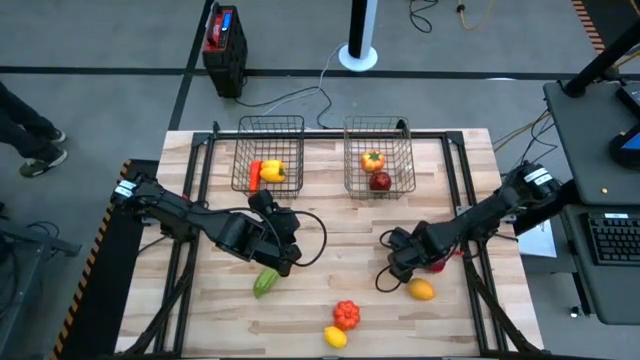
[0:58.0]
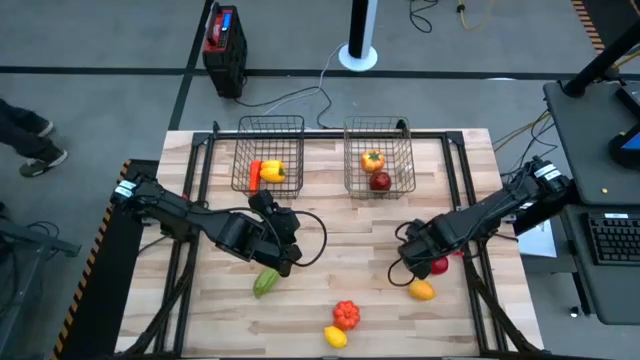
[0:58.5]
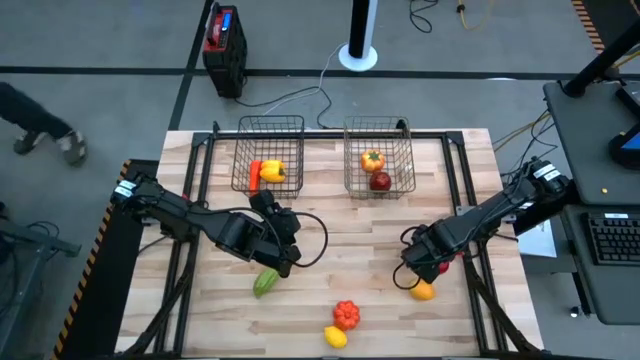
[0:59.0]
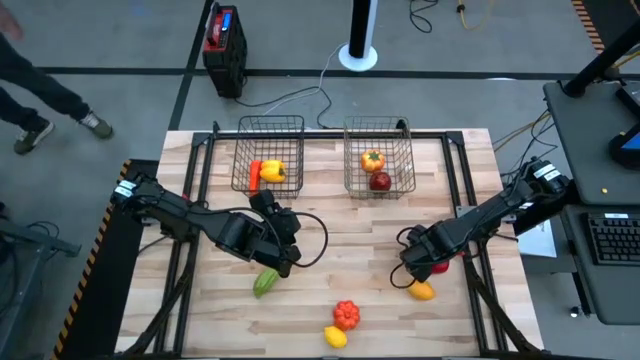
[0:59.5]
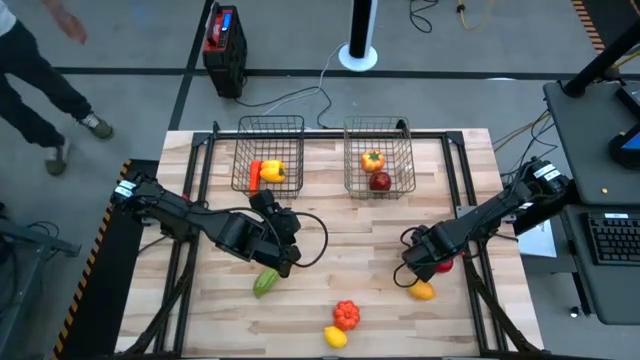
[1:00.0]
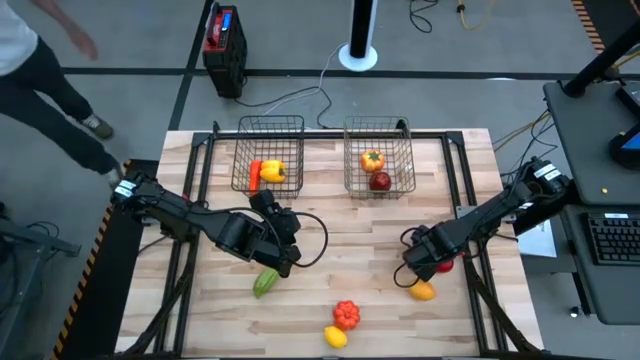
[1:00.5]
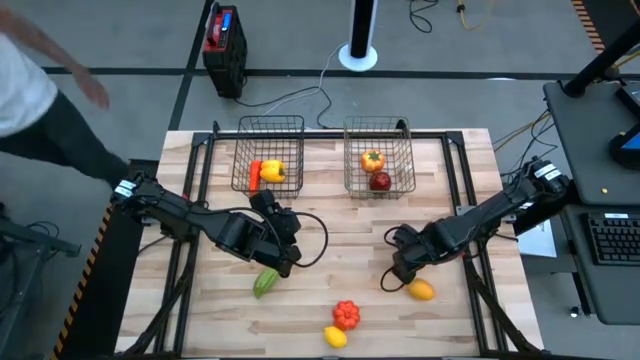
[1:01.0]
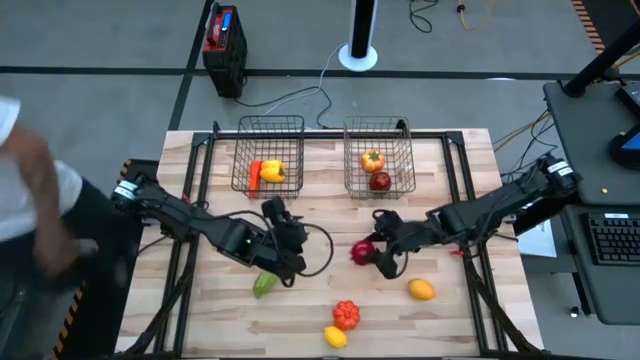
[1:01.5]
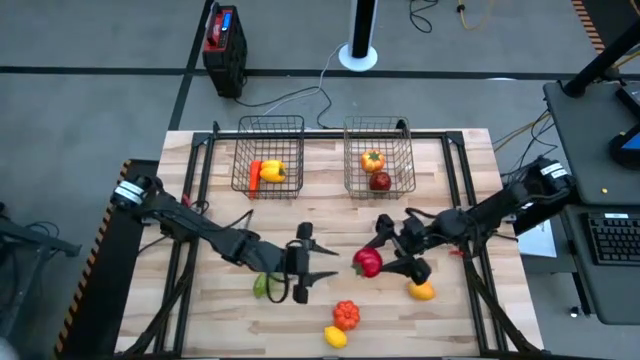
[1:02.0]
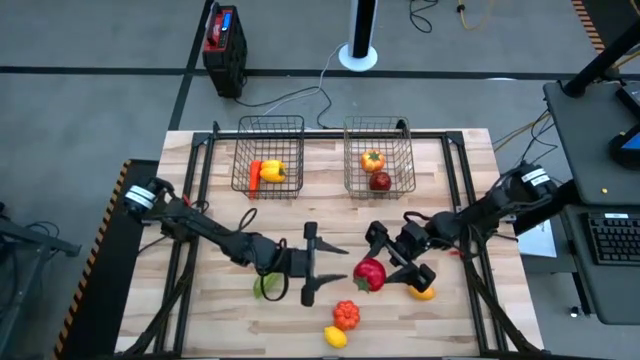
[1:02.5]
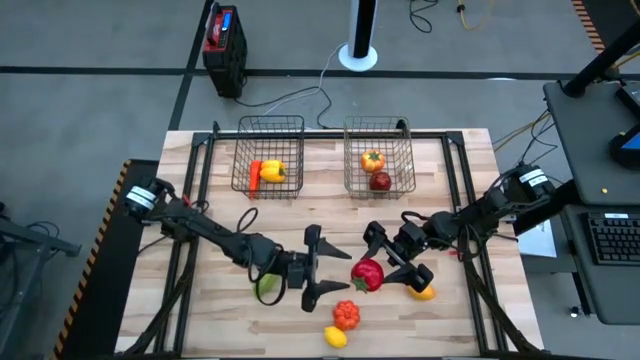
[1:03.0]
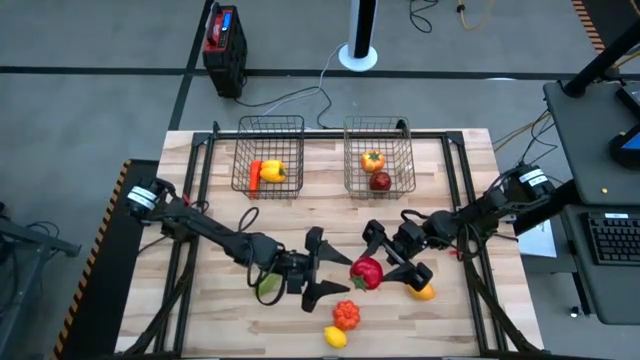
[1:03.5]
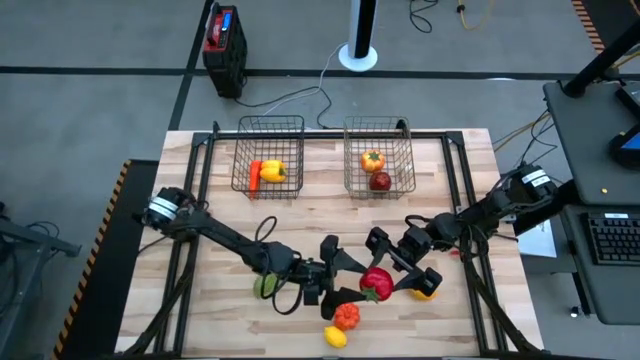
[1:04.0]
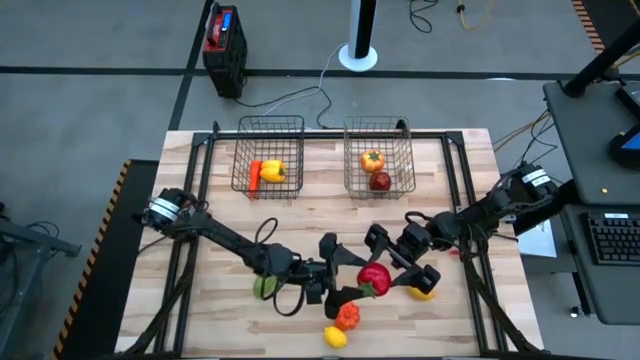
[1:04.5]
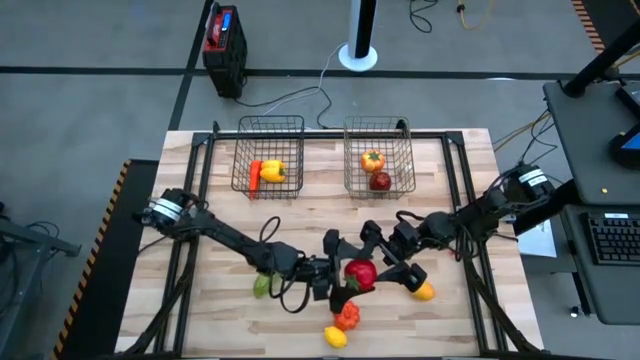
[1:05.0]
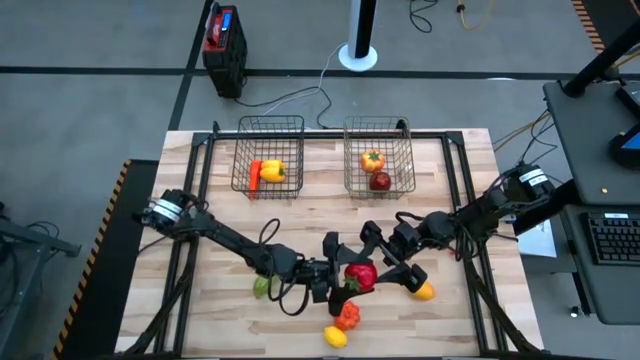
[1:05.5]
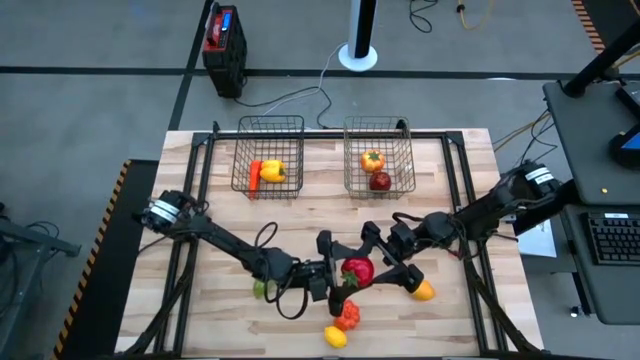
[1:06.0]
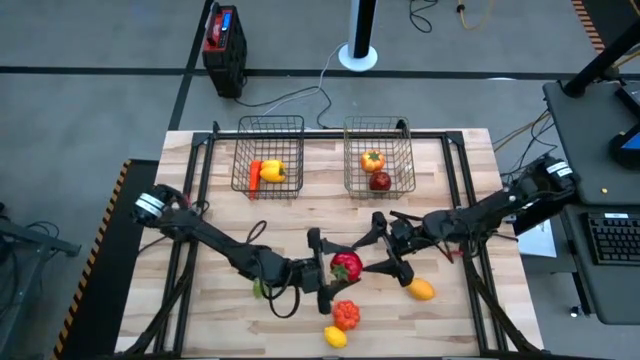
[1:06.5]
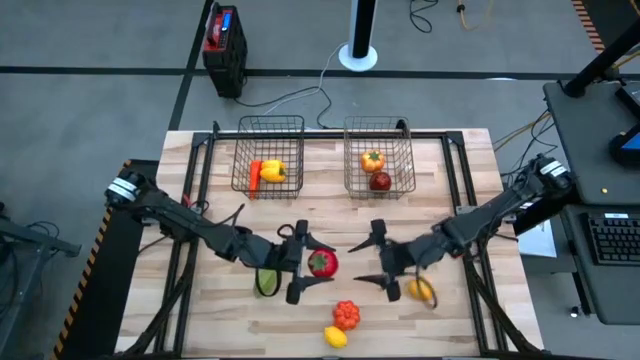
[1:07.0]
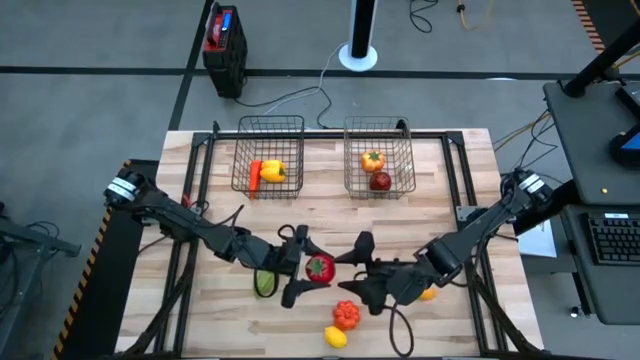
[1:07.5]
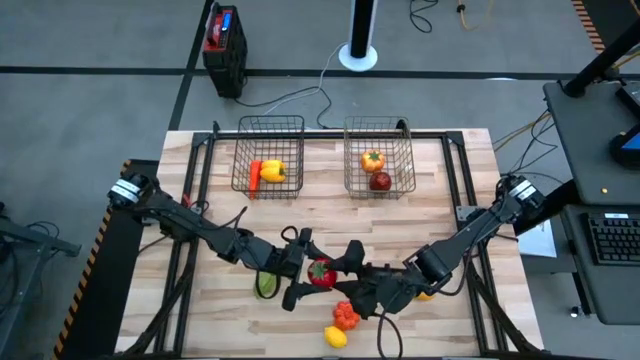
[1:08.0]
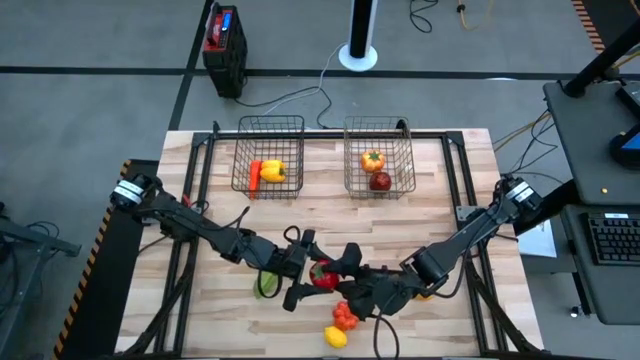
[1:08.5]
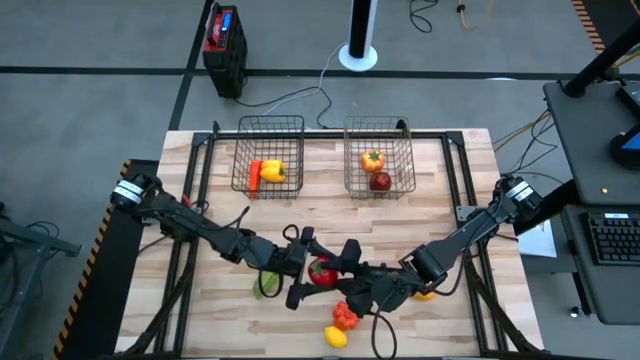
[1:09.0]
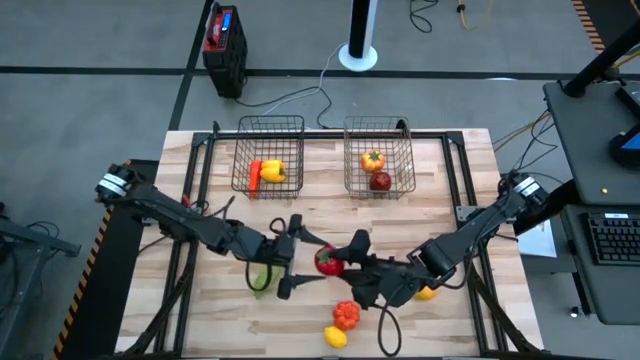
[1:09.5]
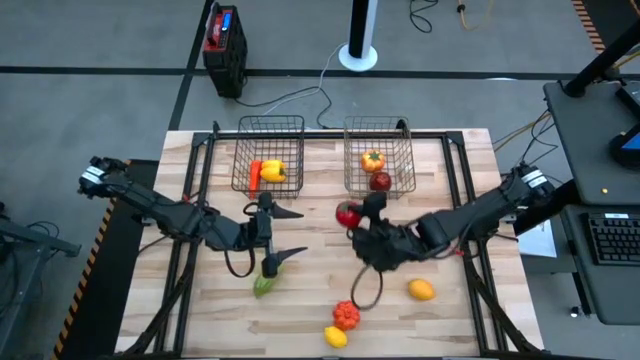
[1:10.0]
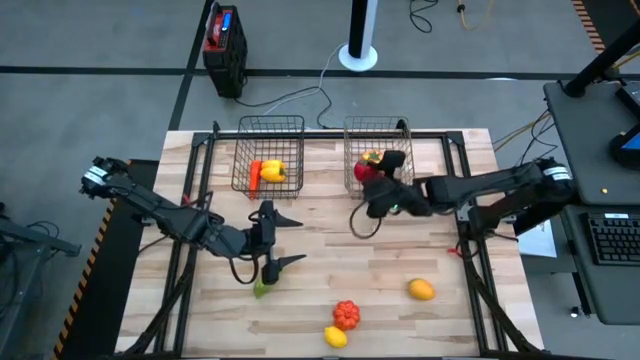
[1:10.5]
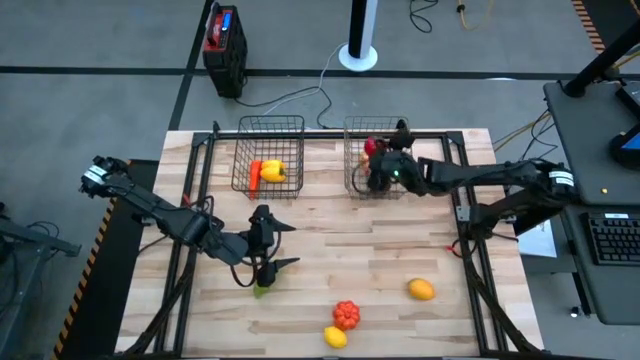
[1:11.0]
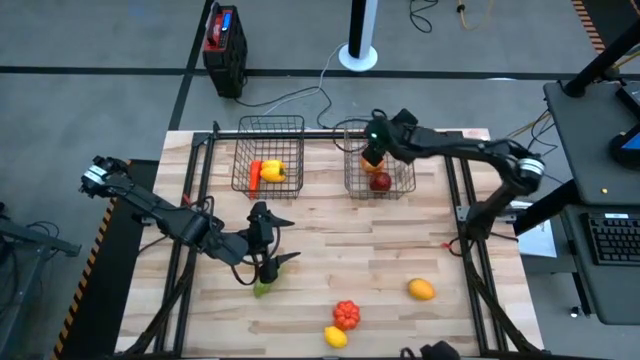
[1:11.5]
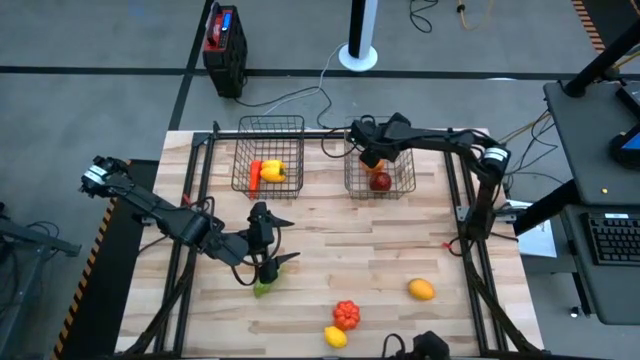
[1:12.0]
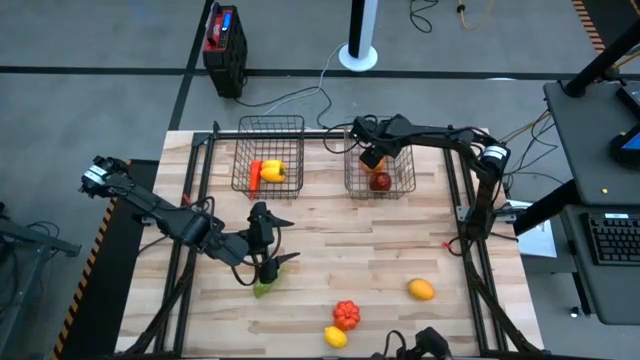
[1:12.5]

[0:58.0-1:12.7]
Task: Sort produce into baskets
Put the red tomato into the gold wire basket

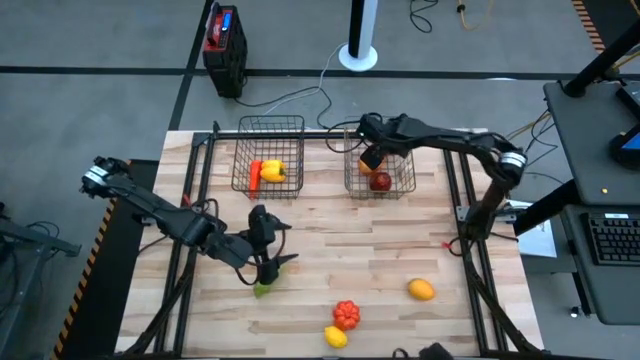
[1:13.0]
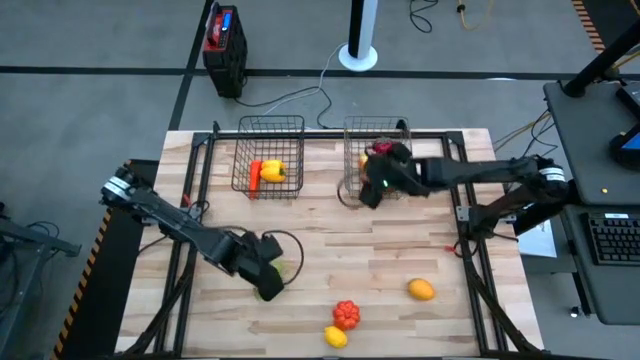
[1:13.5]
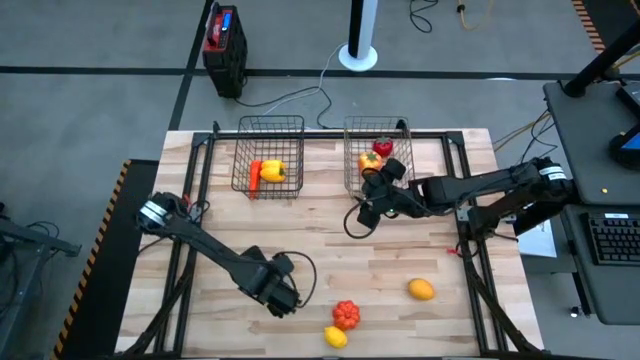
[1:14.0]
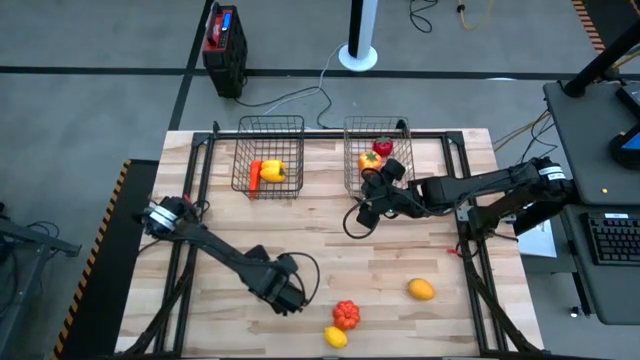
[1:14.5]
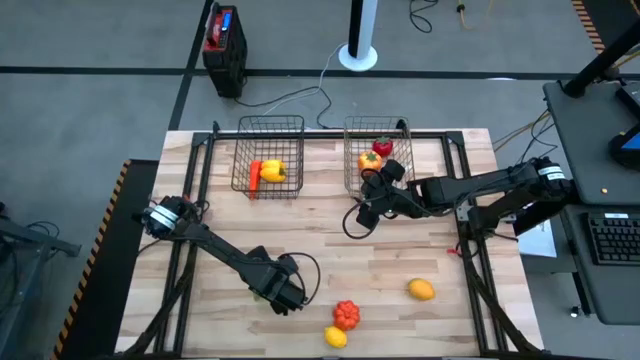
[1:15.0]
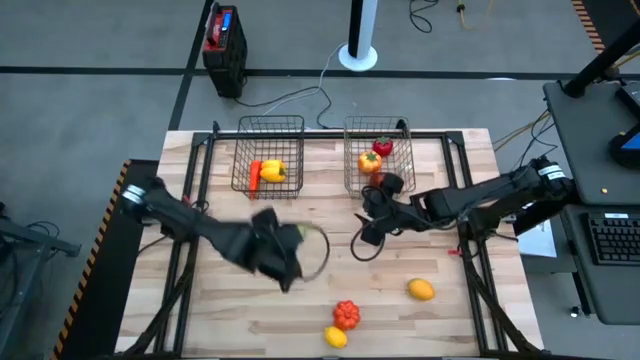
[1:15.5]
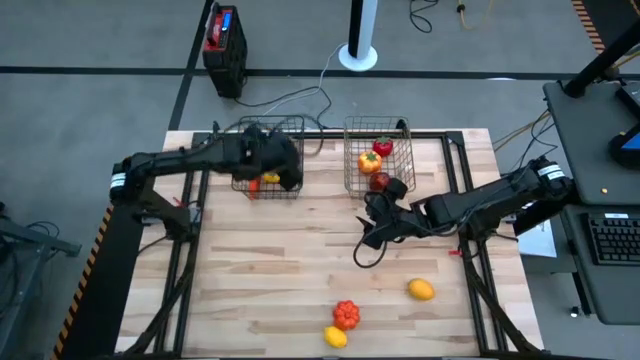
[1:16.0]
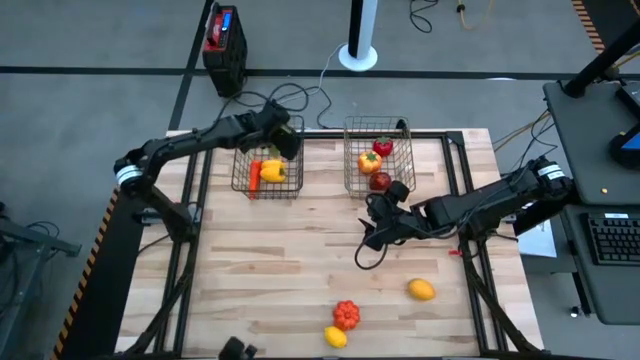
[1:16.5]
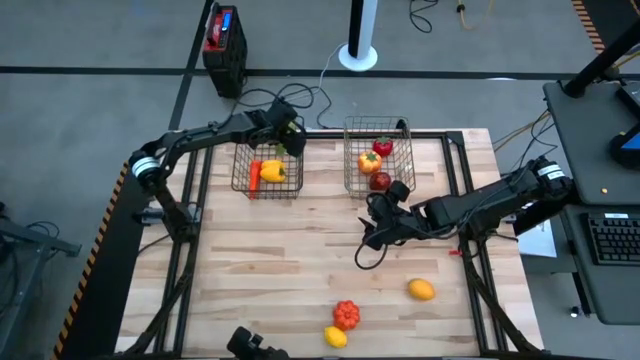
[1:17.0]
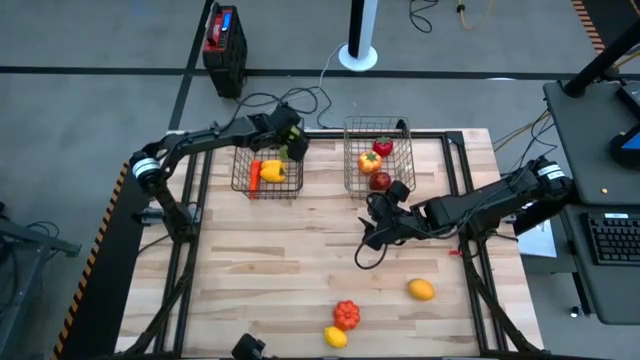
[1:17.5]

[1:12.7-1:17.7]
Put the green cucumber into the black wire basket
